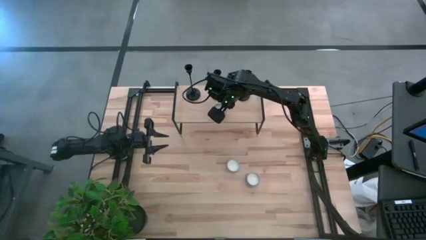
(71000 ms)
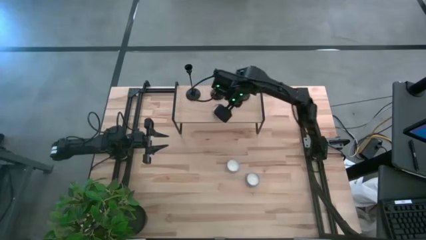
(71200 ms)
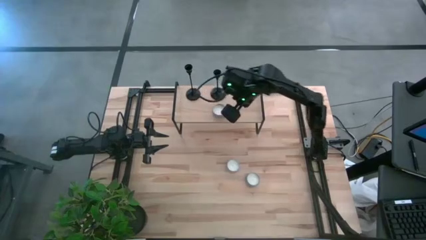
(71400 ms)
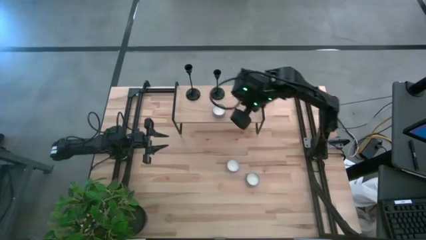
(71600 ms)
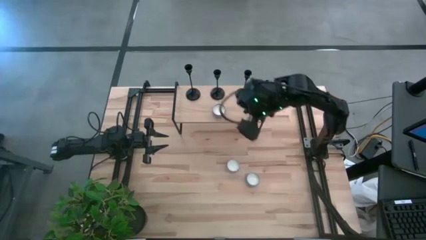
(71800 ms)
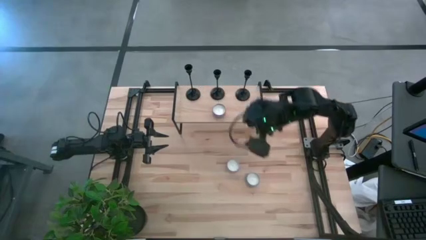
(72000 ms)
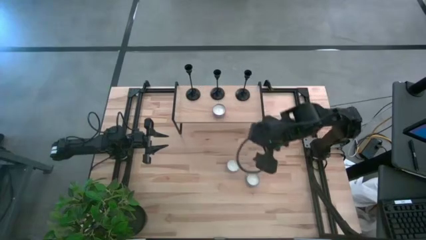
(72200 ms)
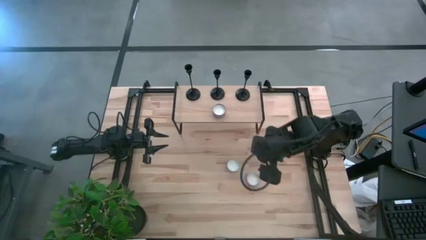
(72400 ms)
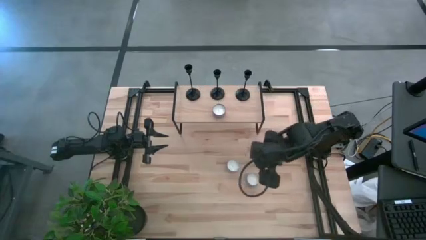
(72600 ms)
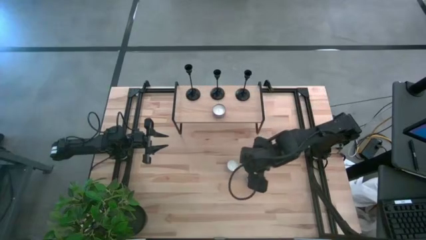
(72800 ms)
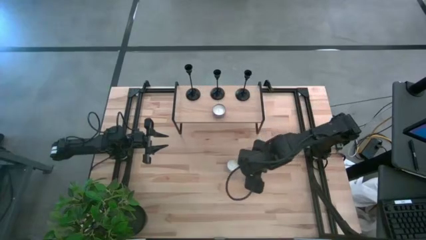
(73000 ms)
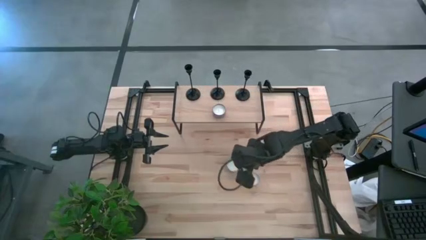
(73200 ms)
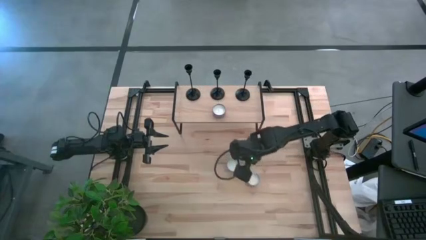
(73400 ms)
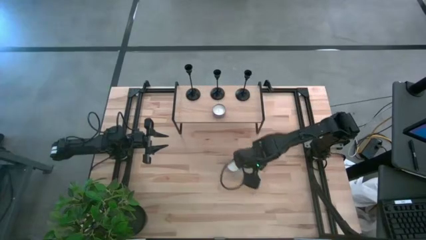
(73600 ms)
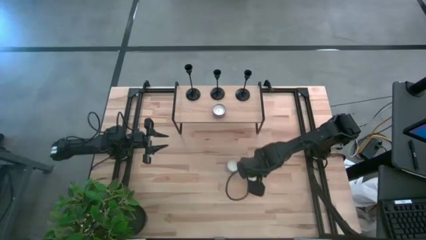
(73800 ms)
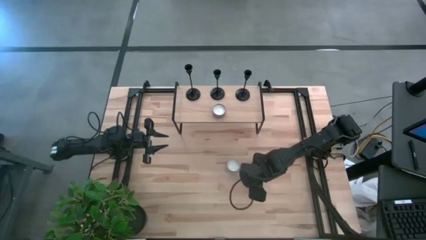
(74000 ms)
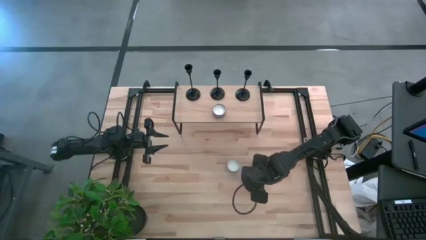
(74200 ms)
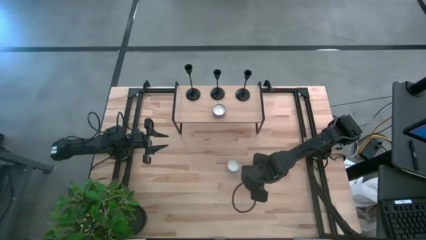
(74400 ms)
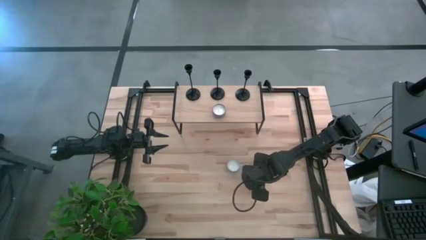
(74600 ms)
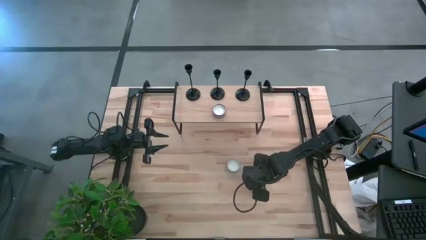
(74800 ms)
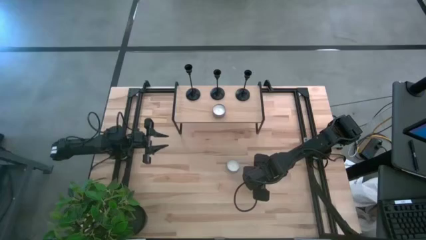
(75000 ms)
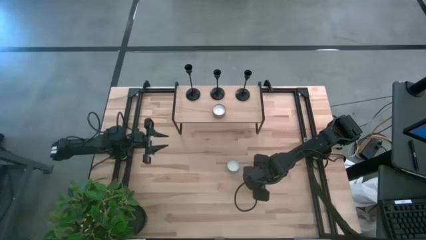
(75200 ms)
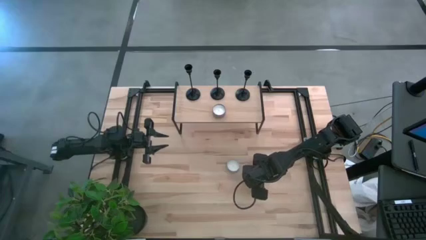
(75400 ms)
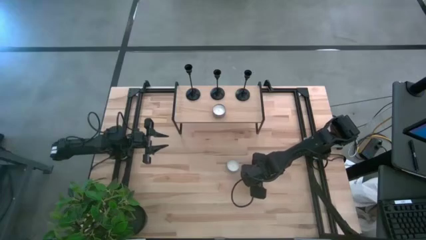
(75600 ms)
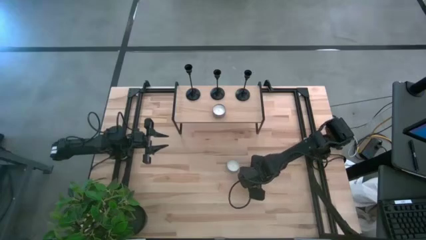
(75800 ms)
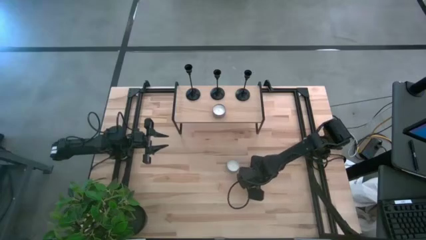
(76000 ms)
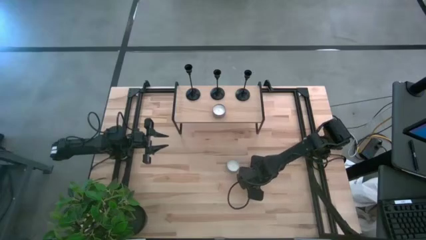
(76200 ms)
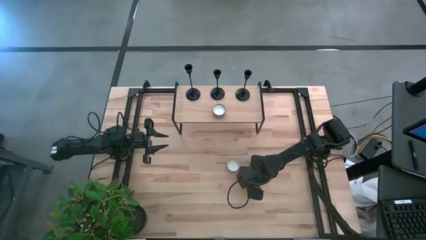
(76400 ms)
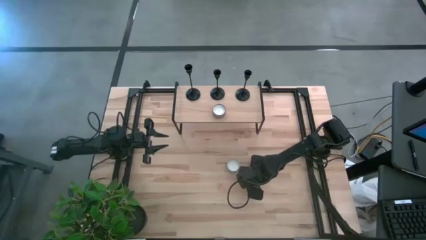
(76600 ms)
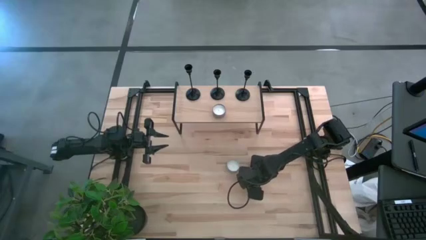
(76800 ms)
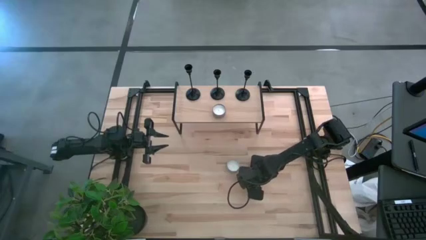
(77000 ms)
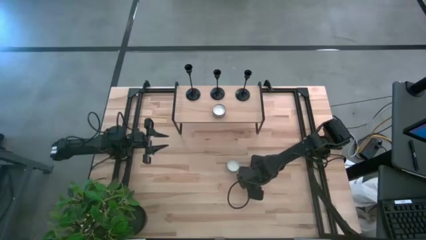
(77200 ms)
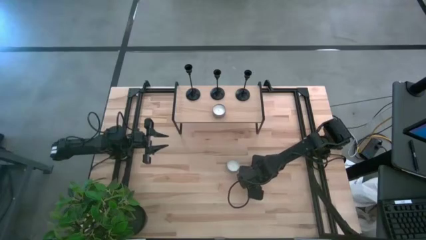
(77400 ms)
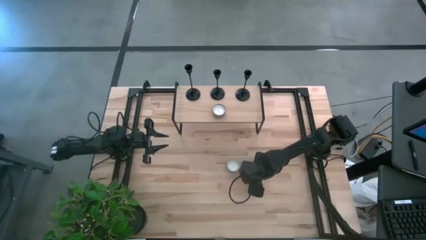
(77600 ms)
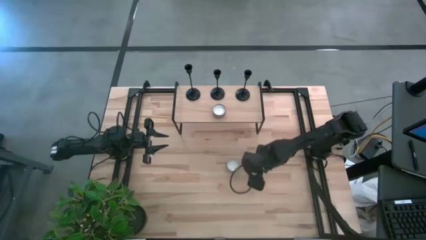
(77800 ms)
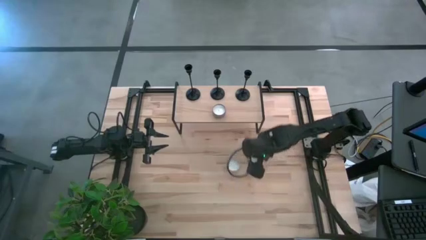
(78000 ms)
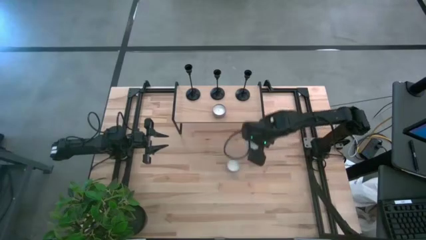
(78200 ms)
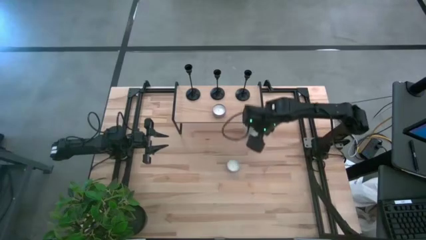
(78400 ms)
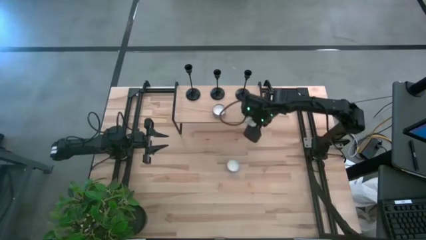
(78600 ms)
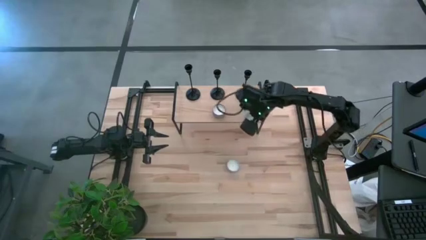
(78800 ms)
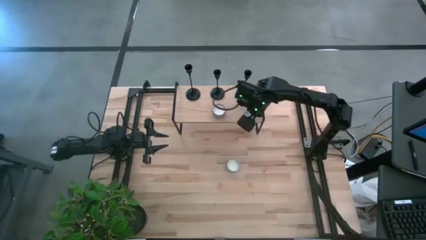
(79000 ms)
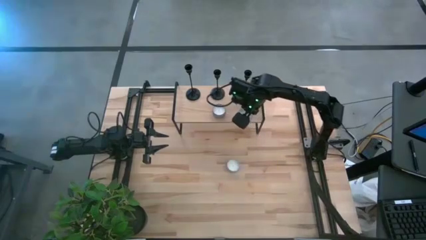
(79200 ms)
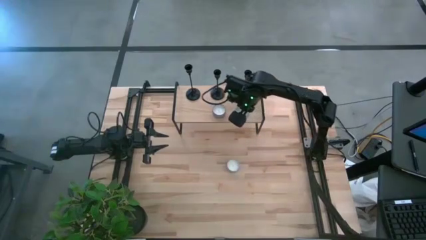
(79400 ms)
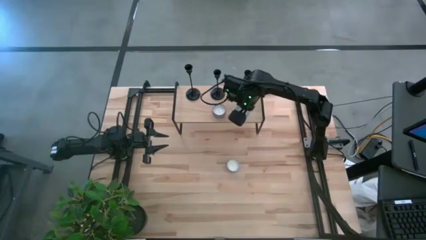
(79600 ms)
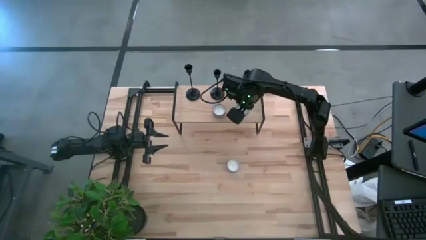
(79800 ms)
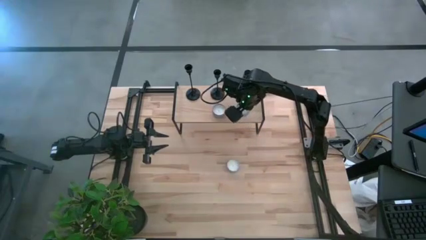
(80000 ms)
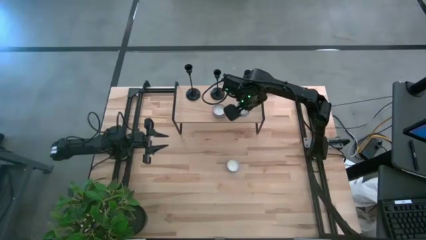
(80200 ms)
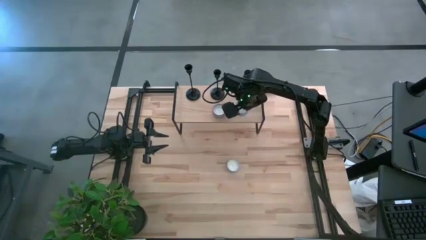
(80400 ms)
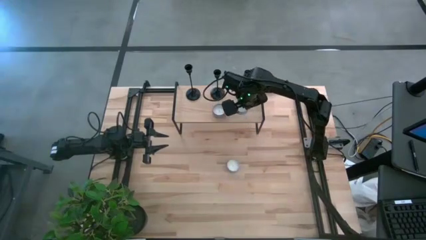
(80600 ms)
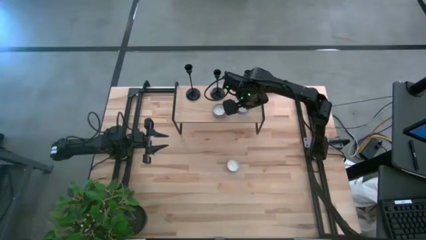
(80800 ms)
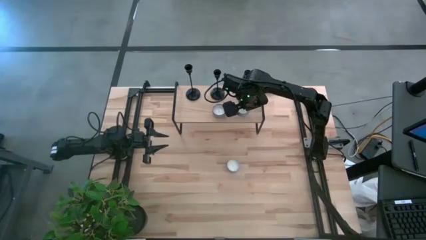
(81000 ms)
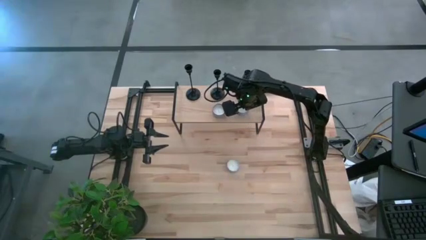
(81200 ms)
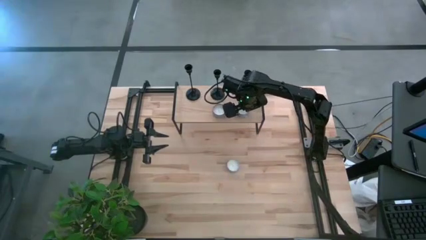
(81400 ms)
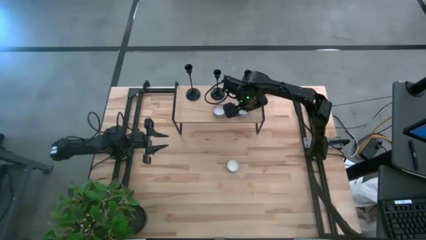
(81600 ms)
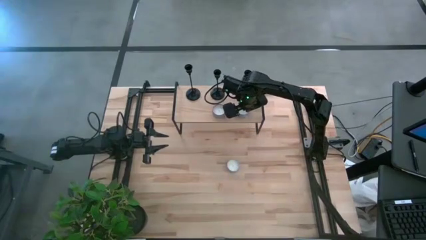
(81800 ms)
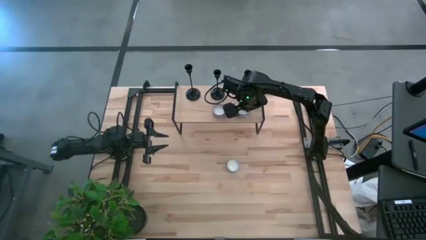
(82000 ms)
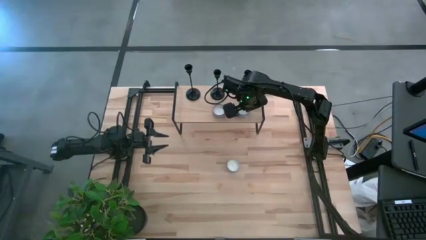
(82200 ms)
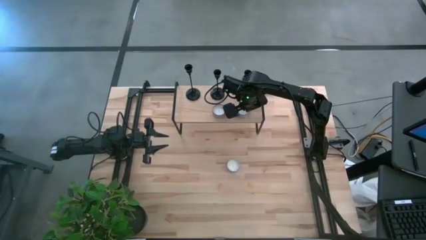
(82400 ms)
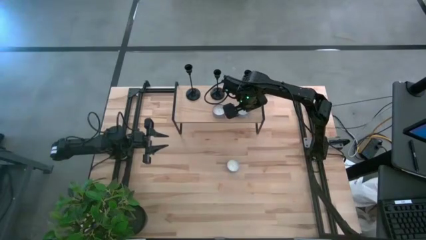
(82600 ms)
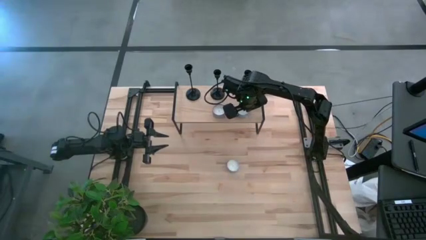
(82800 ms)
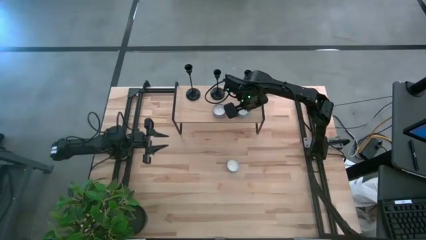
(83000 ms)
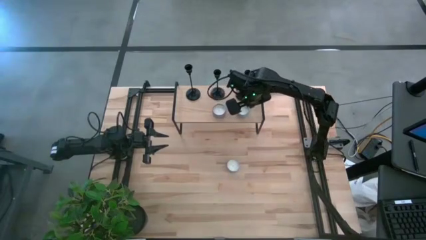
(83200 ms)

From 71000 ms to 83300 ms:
Task: Pick & Place candle stick holders
Align the blue scented candle with the other scented candle on the shelf
